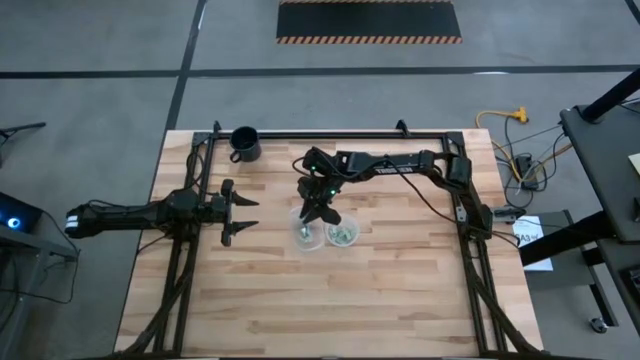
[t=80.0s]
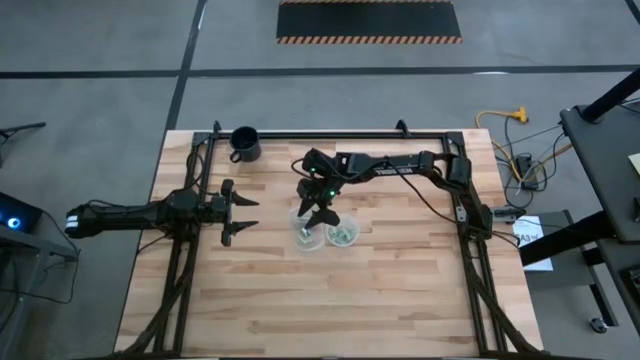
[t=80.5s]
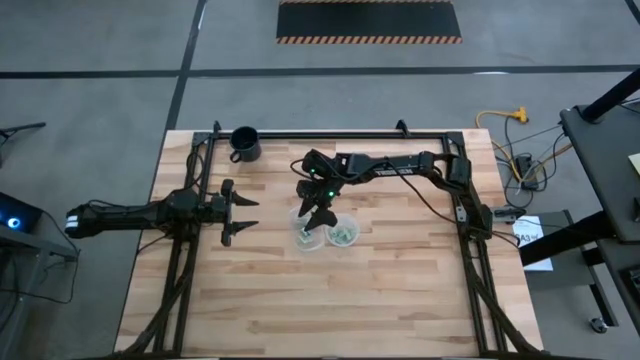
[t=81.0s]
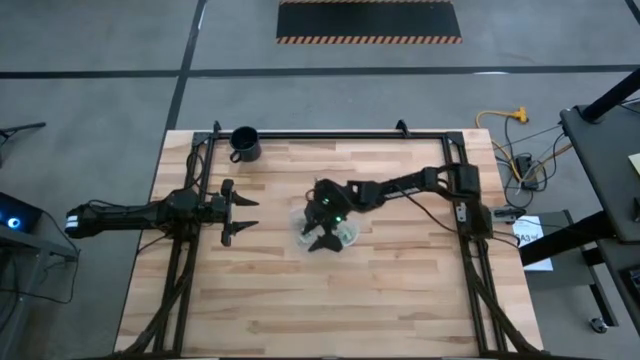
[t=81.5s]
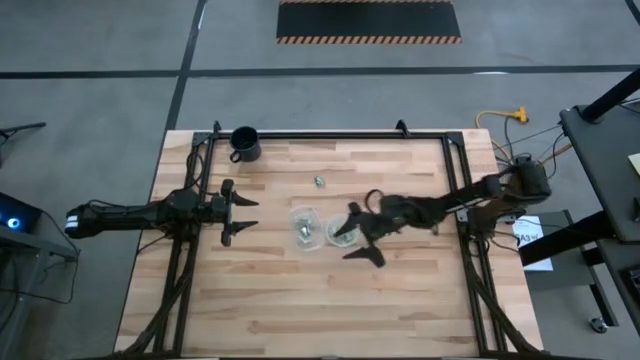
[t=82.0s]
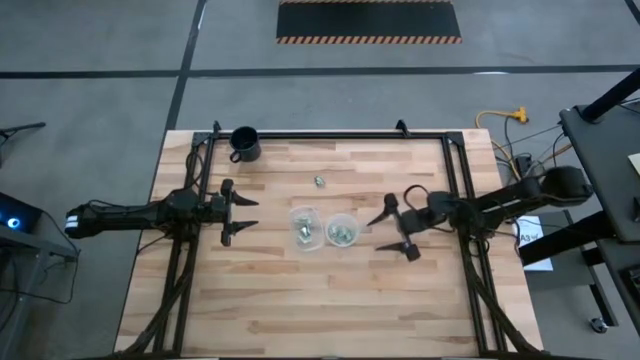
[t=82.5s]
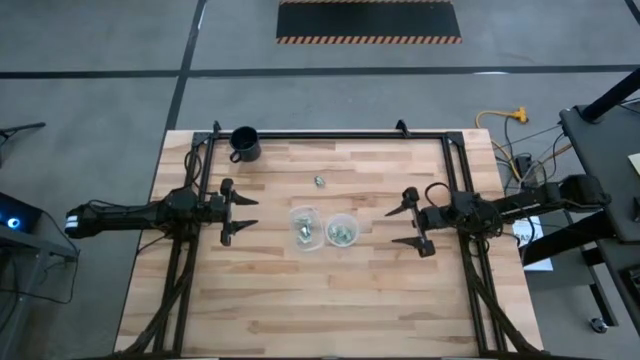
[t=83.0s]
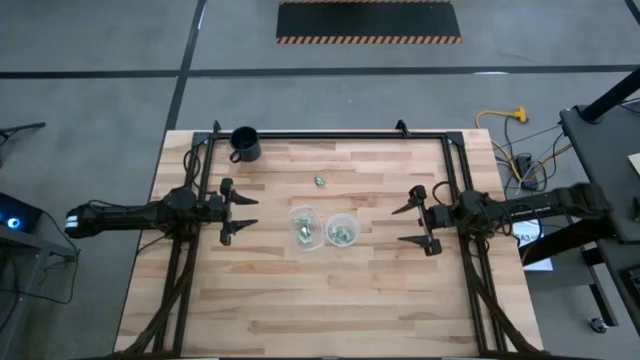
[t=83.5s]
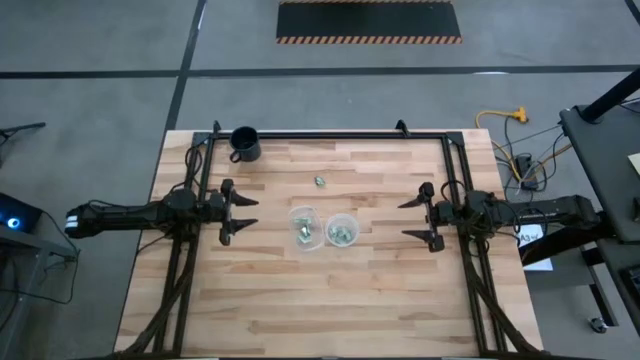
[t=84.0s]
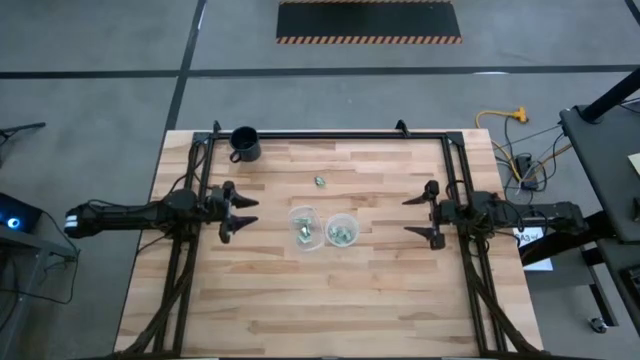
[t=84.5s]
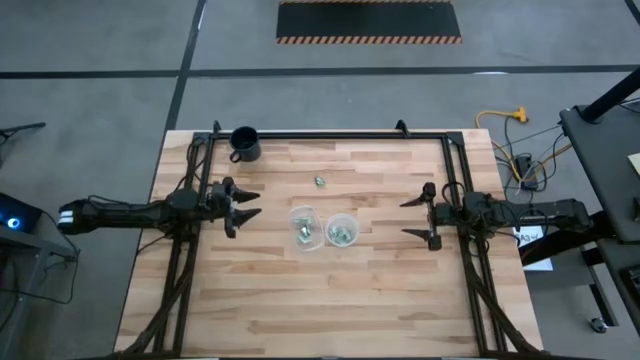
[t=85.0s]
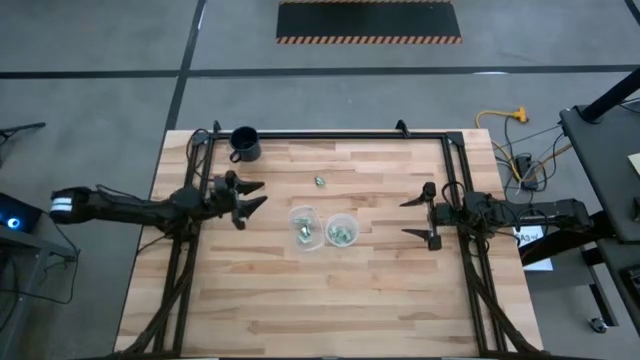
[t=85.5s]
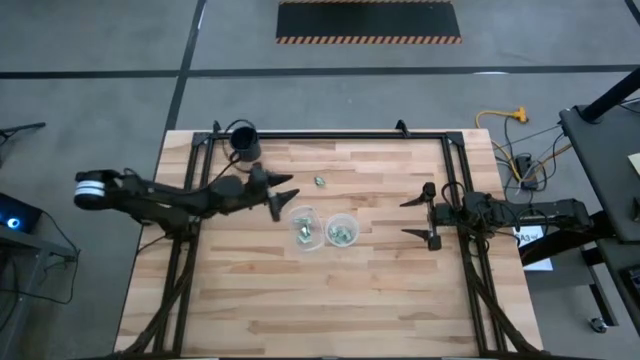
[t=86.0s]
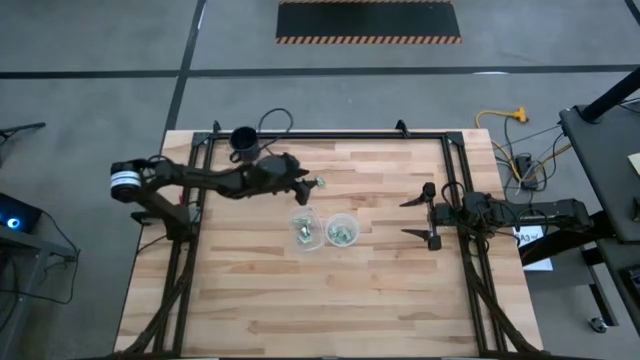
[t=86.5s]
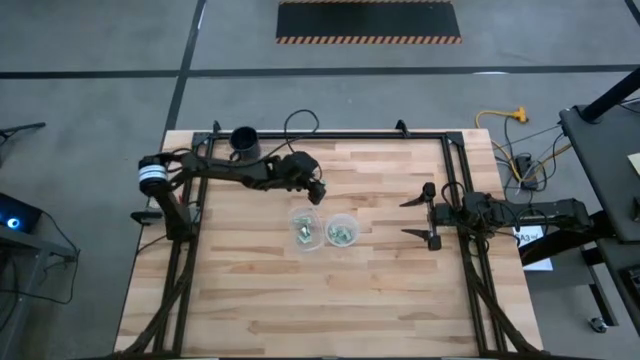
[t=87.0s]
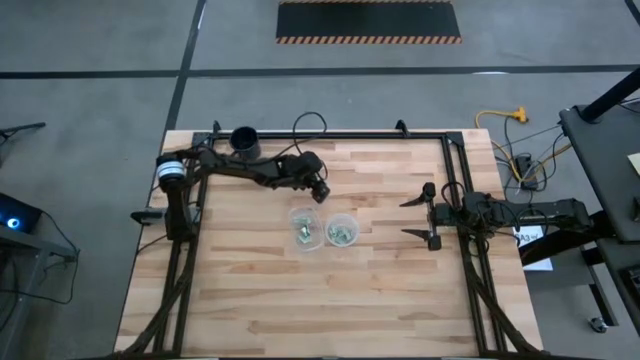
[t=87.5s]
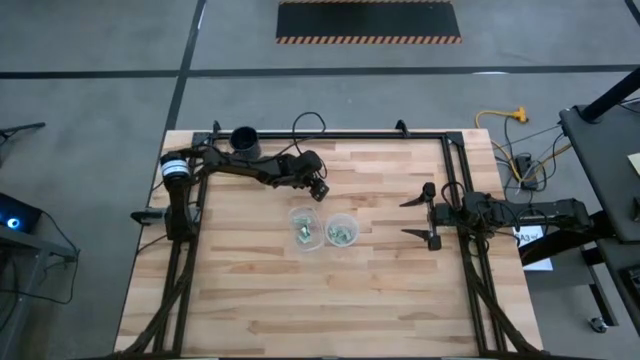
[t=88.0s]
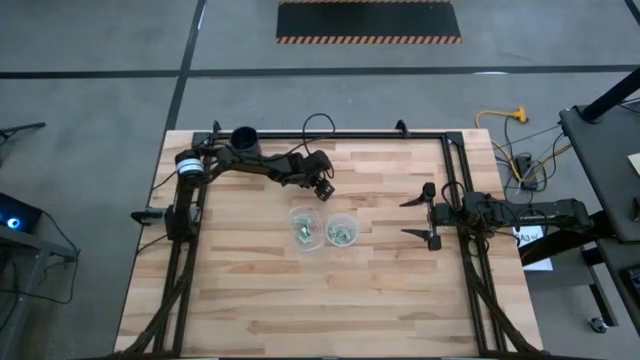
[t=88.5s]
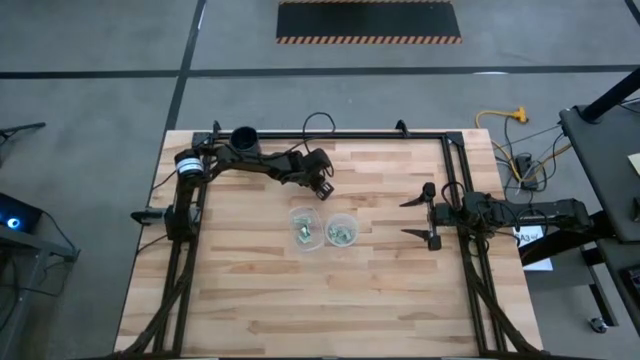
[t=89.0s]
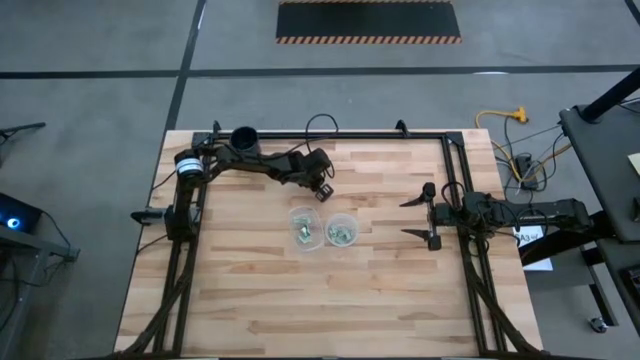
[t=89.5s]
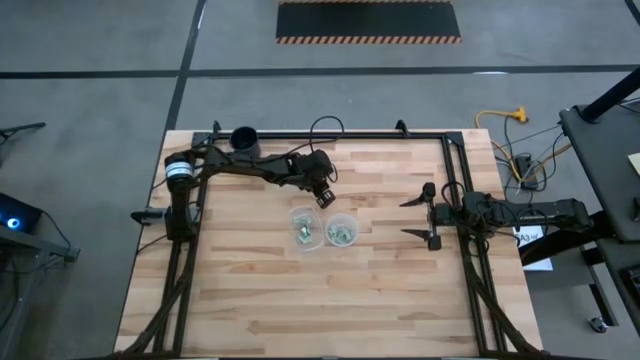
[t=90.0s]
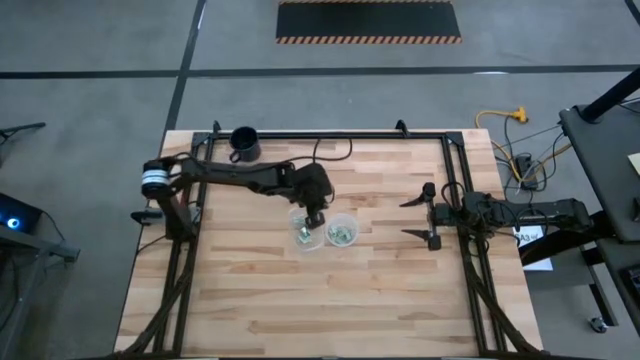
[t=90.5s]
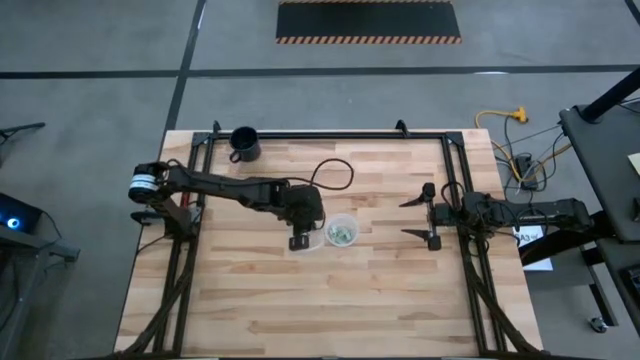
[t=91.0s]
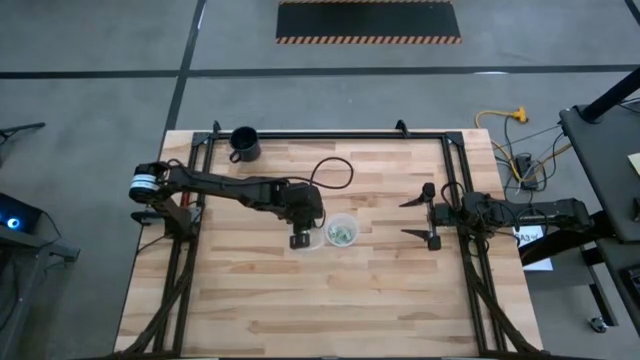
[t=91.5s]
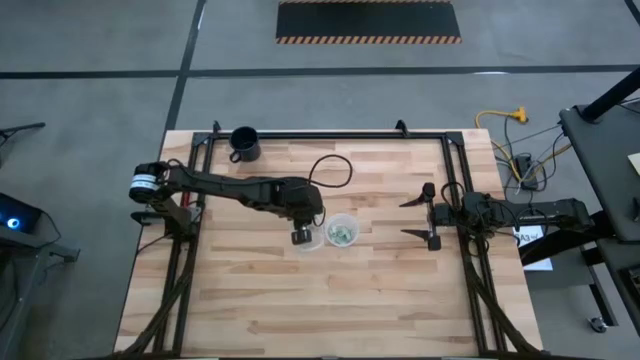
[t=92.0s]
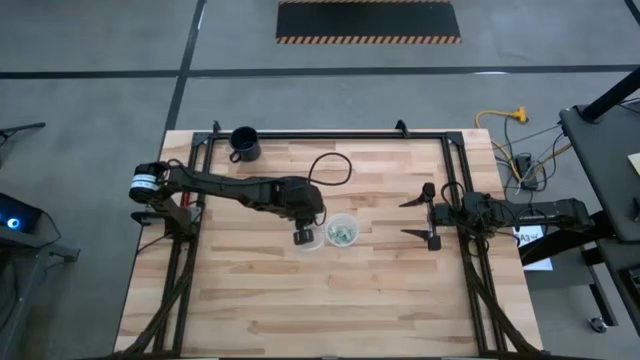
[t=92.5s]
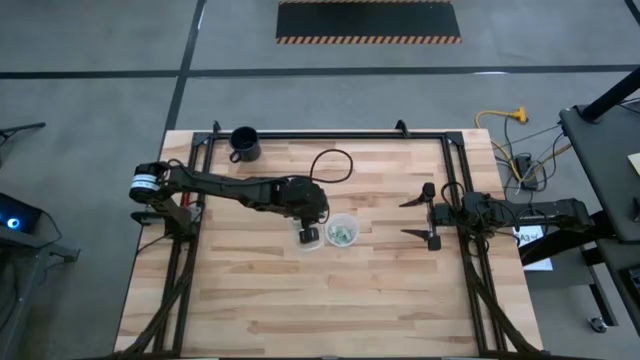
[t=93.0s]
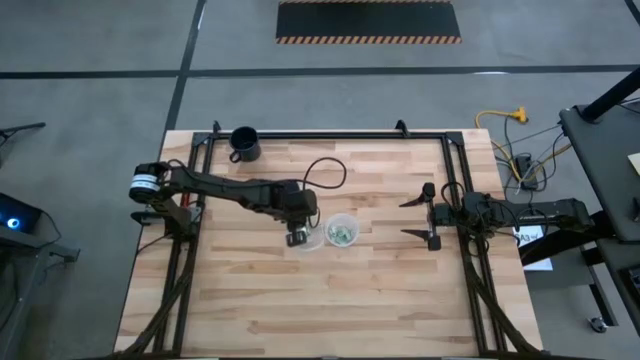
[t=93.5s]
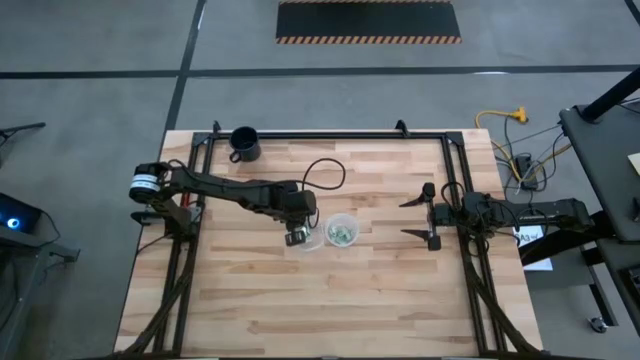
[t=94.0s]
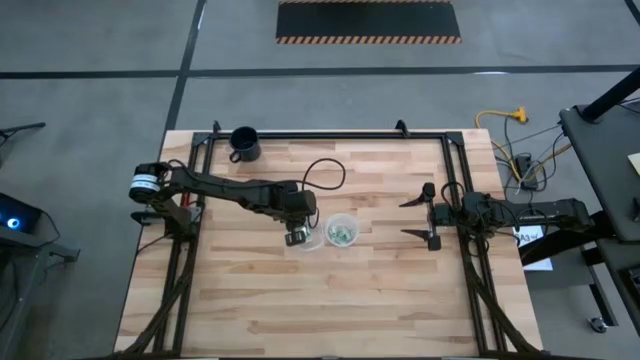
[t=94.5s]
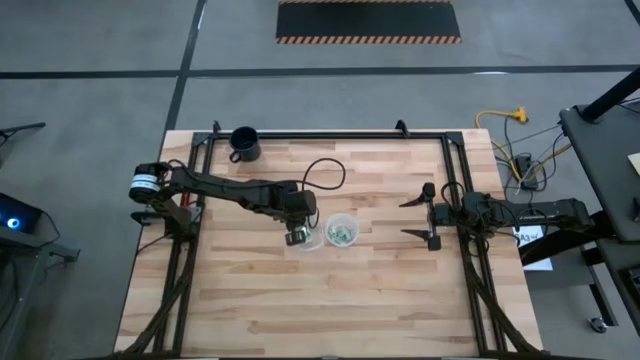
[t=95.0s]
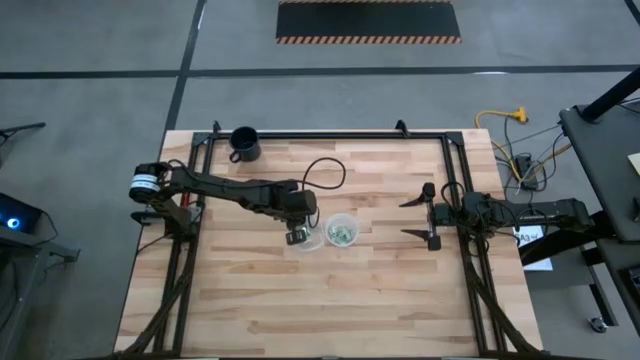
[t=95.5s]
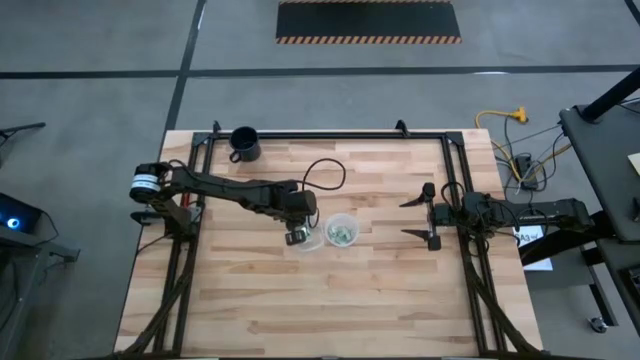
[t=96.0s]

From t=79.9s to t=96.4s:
Task: Pick and place Stevia / Truvia into bins
Put the green truvia packet into the left transparent container

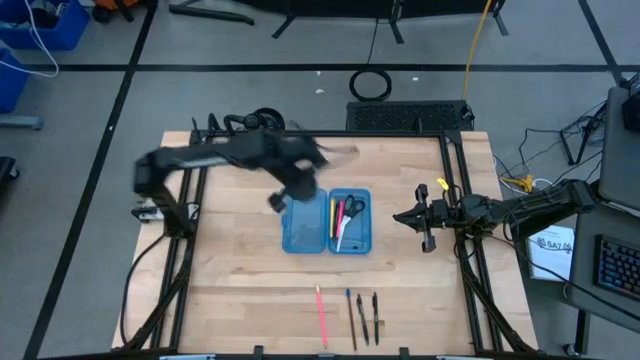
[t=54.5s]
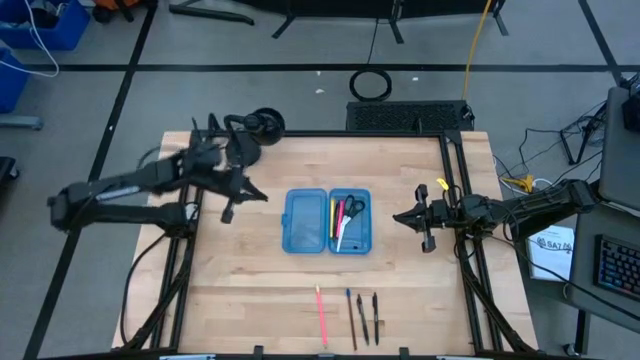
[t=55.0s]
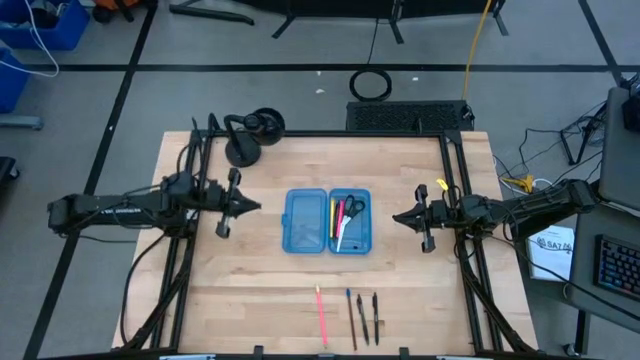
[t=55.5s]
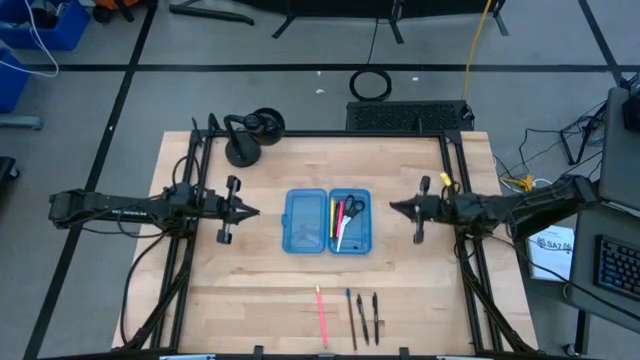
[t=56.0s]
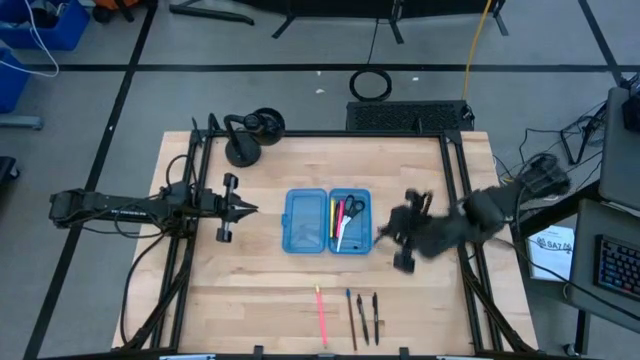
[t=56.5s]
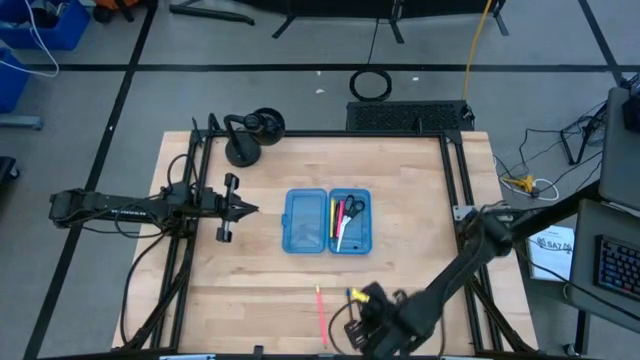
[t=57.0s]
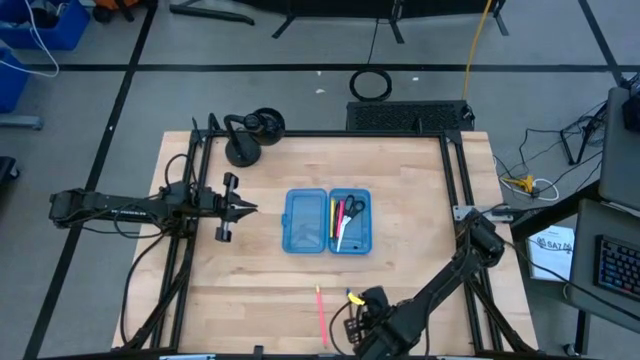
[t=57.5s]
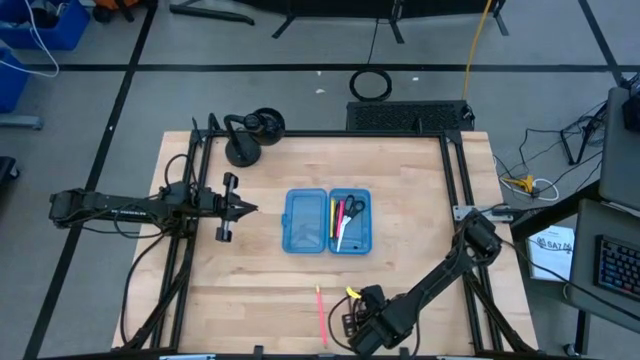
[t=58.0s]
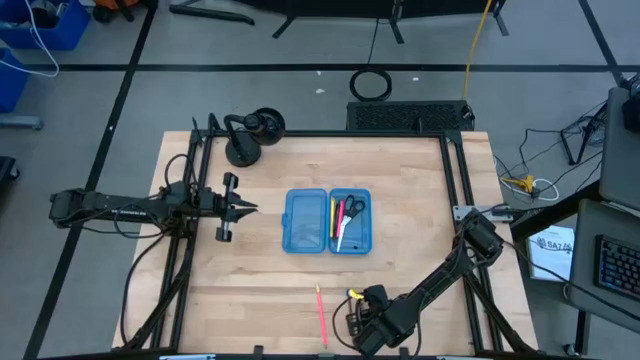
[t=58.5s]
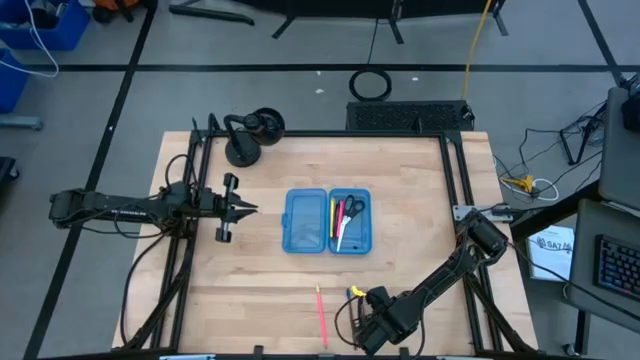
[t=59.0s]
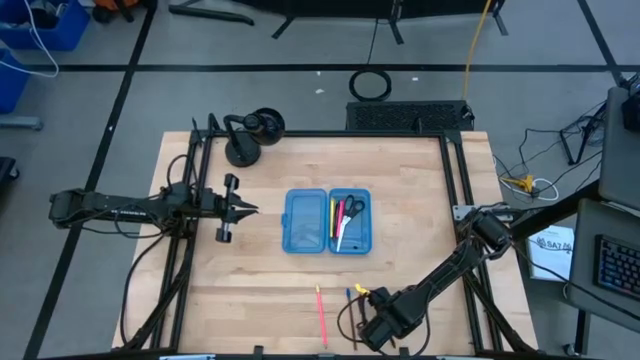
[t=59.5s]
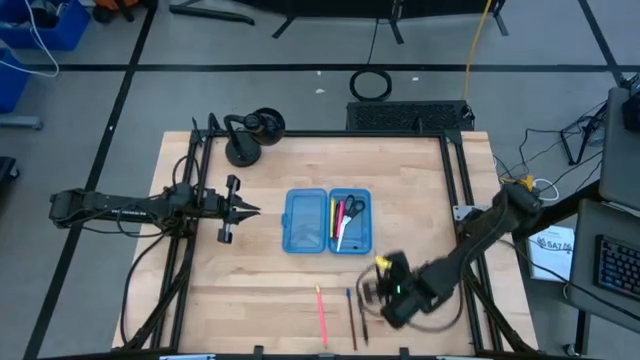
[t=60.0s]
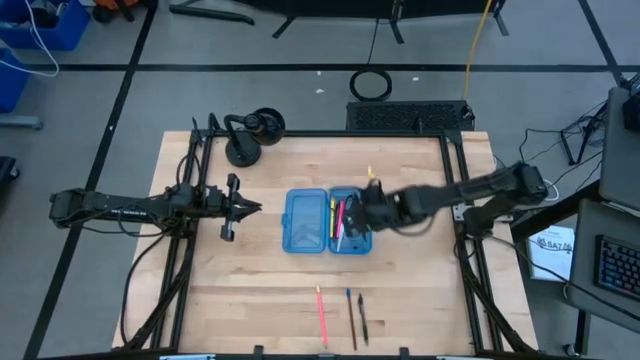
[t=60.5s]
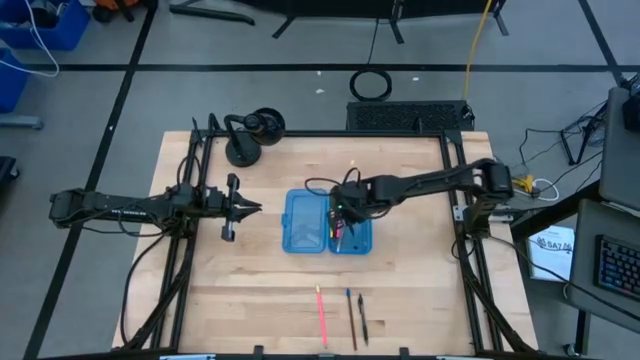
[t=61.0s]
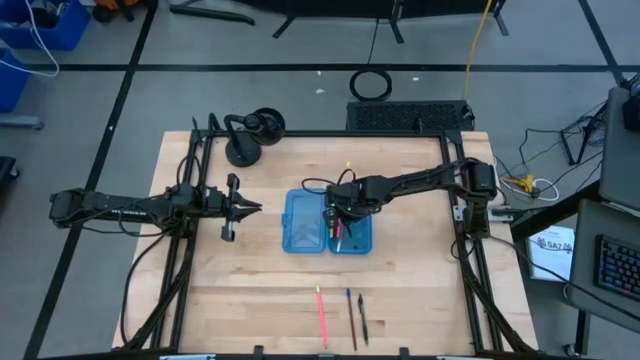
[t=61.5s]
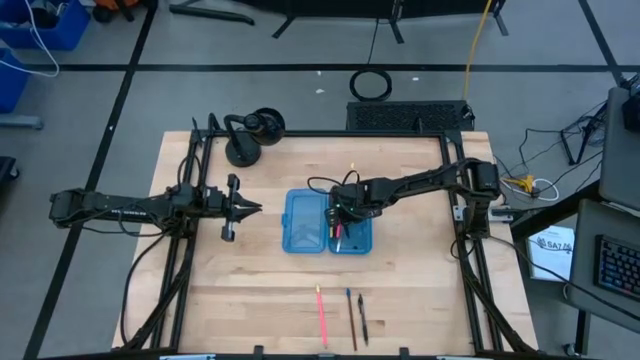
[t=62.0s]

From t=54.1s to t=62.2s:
Task: Pick & place school supplies into a supply box
Put the right black pen into the blue supply box
